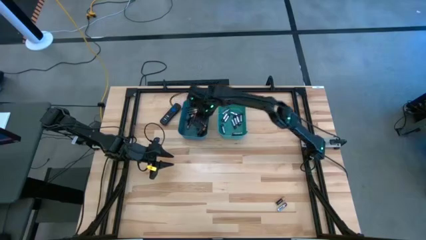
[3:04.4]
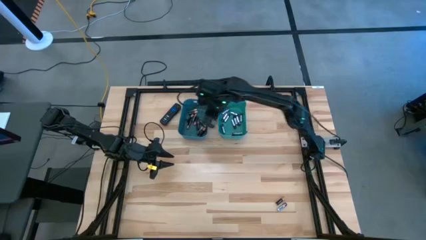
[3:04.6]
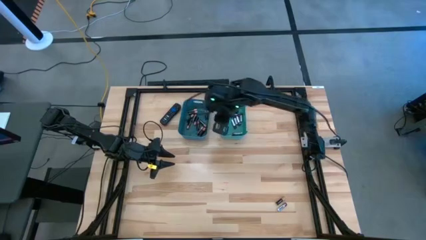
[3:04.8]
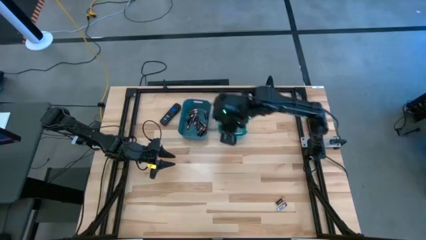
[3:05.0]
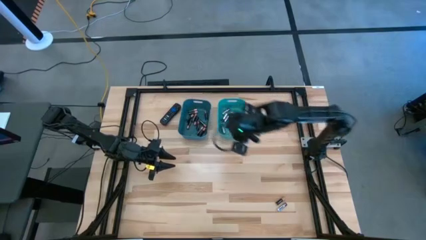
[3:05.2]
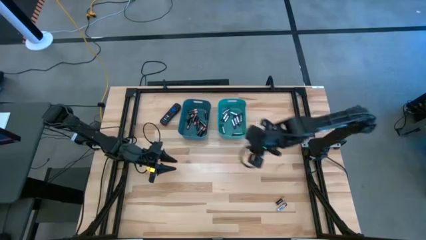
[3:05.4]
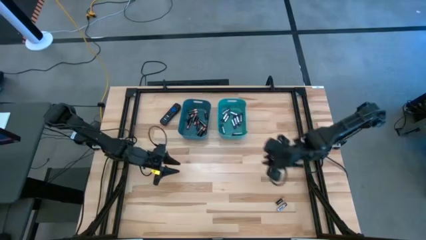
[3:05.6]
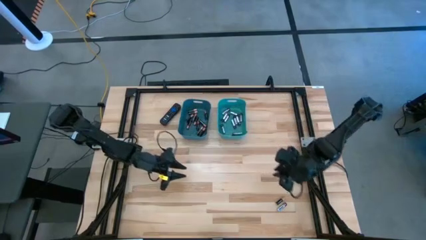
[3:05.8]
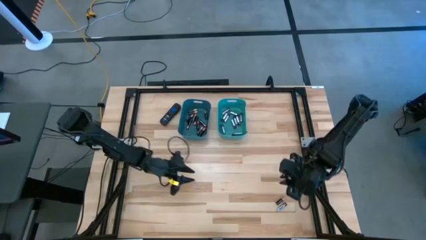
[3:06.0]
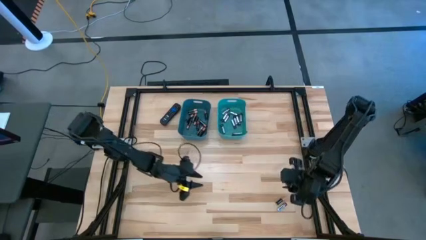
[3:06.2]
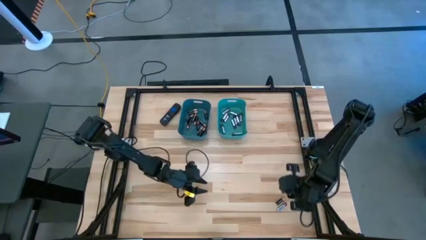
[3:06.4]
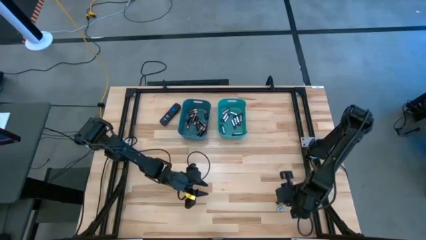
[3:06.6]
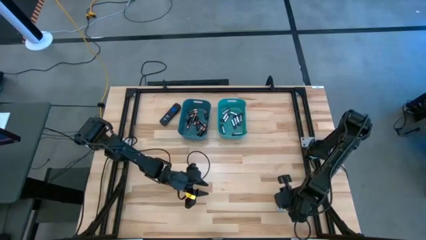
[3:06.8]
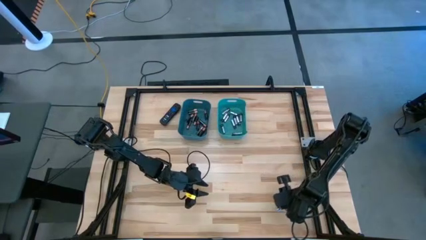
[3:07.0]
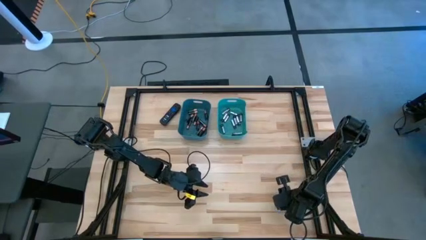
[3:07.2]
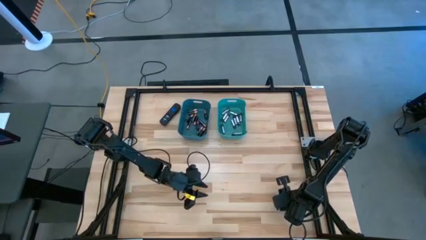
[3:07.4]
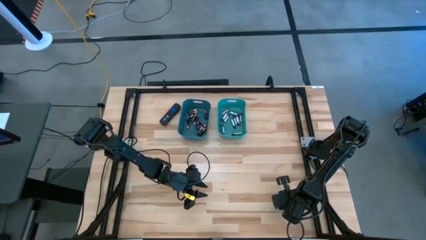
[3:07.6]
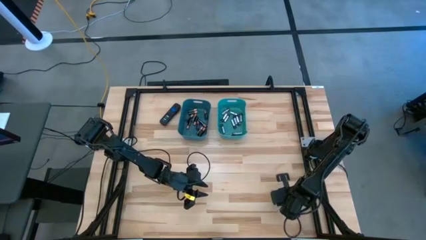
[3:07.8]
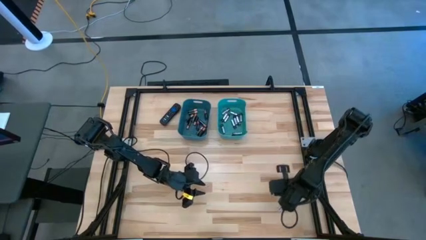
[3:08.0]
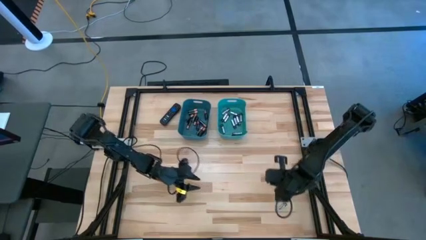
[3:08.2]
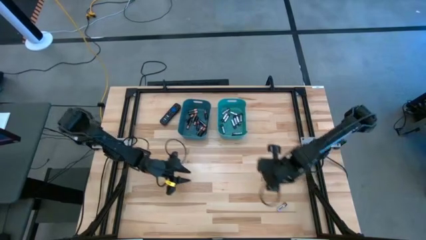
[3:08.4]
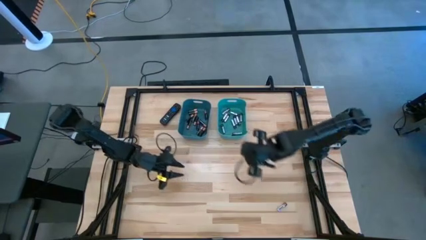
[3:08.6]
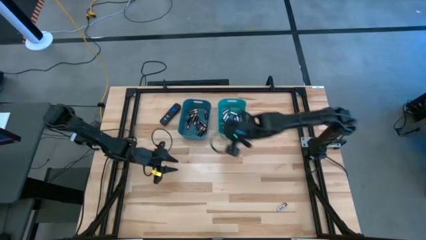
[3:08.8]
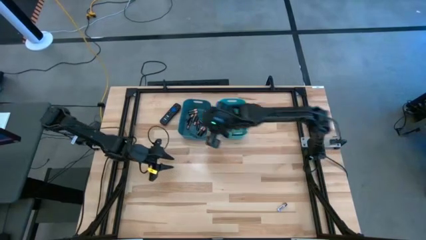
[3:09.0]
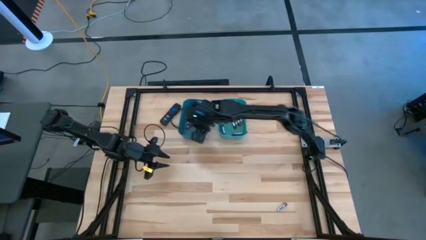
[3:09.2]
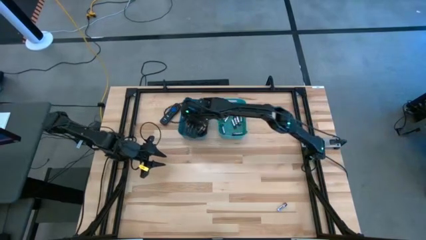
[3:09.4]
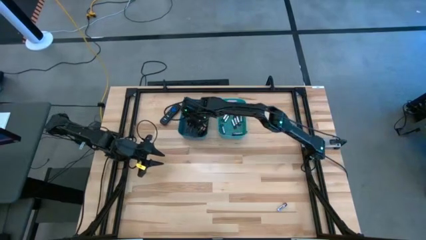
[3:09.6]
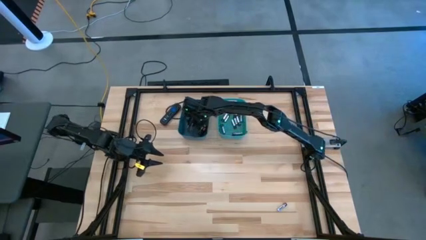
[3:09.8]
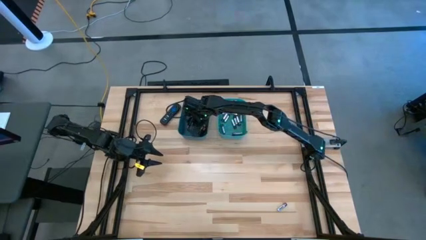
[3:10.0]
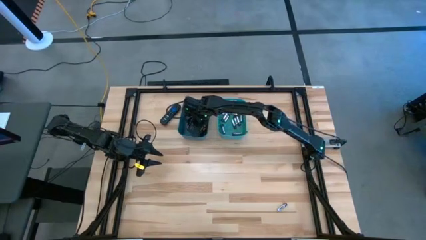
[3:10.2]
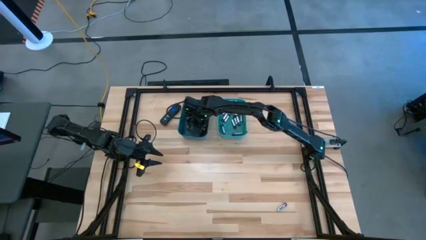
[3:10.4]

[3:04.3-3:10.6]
Task: Sort batteries
Put the black battery into the blue bin

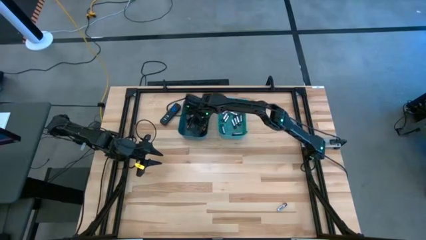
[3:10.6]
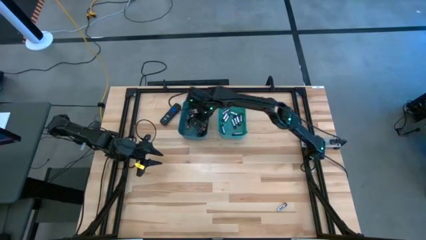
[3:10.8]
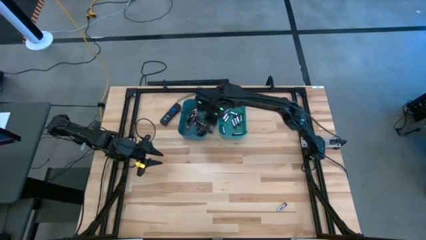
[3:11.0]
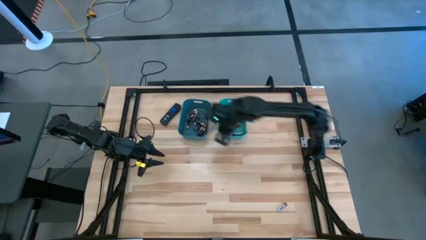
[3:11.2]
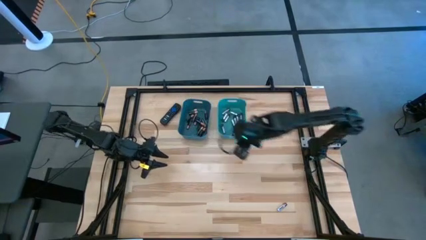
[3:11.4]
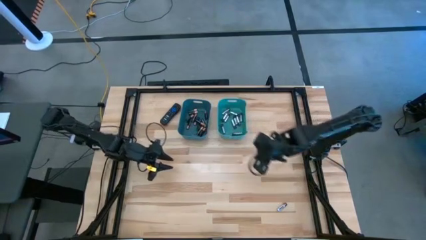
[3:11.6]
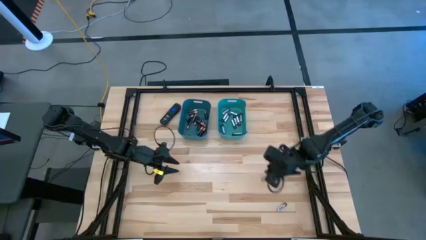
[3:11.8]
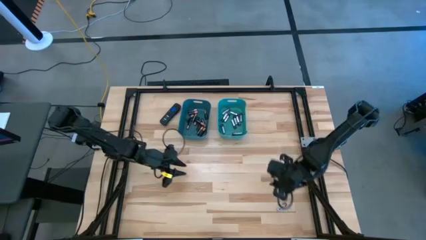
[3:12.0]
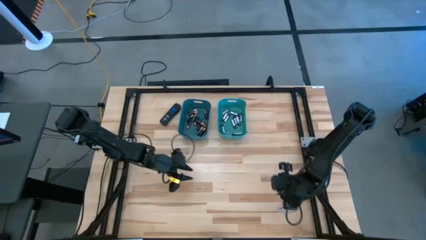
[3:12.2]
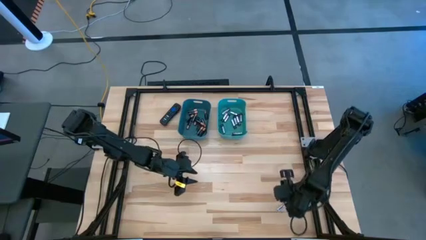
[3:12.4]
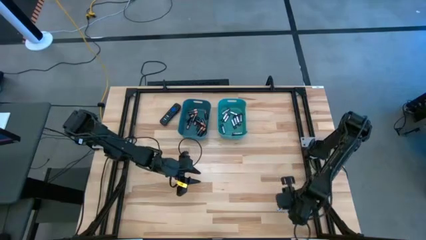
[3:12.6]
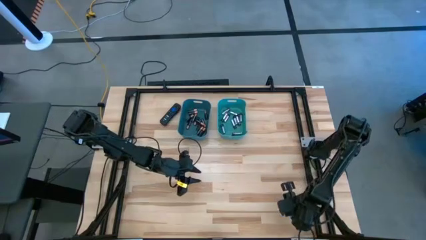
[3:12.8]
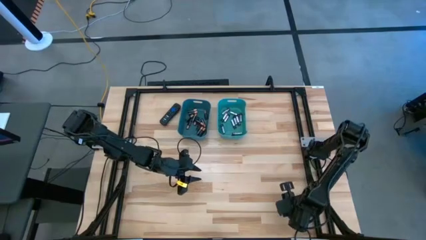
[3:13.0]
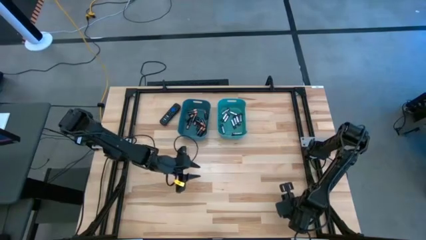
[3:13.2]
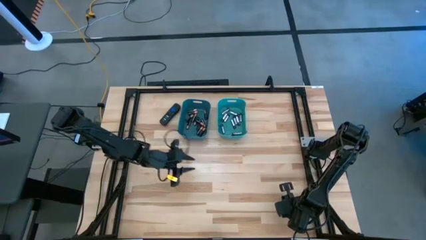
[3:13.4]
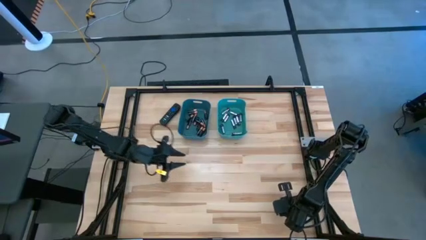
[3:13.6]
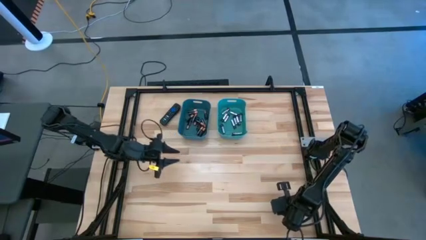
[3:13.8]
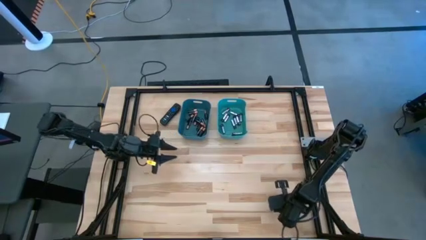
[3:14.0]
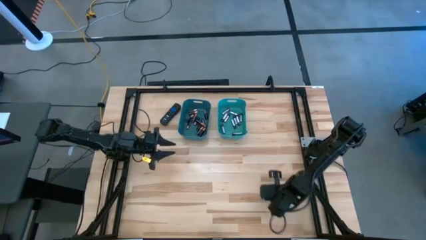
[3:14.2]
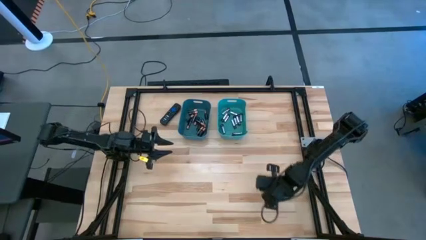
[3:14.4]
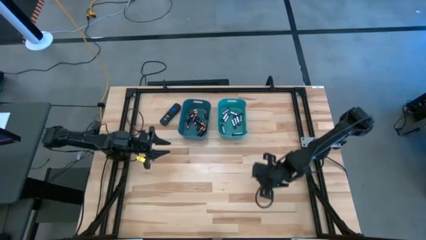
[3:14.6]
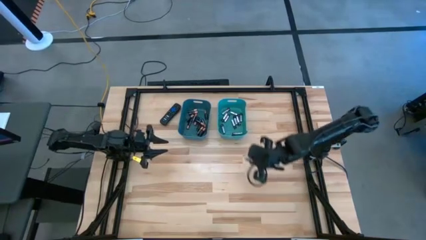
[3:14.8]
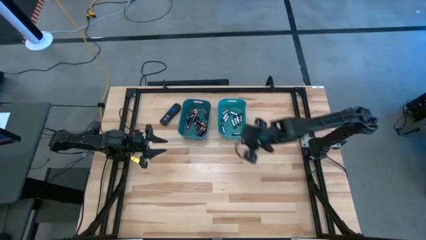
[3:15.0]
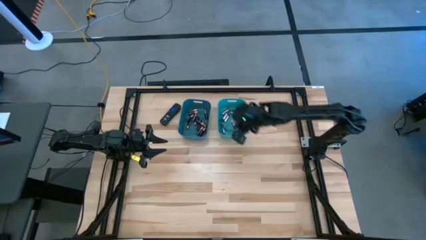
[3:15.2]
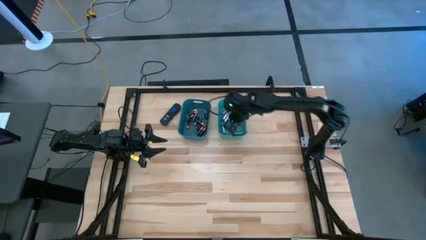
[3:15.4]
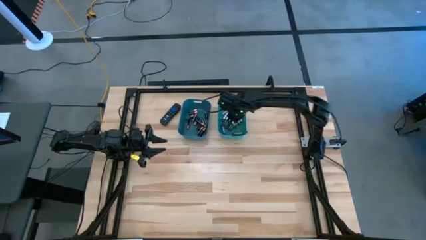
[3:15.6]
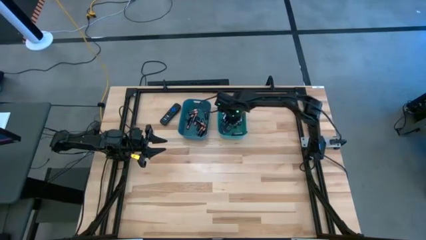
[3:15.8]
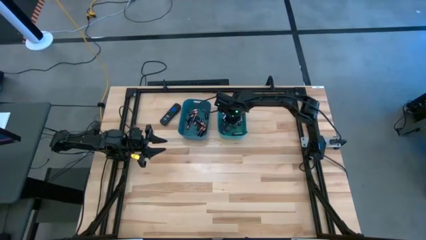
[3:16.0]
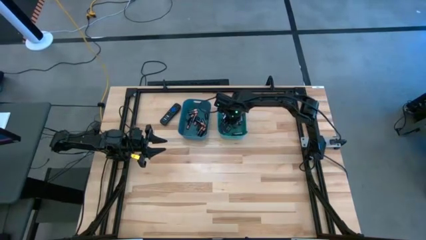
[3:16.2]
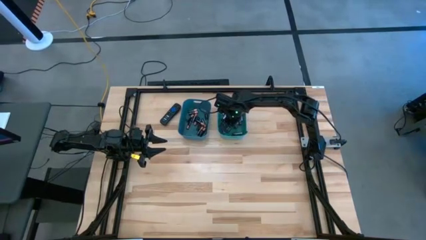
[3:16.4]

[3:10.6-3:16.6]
Put the silver battery into the green bin

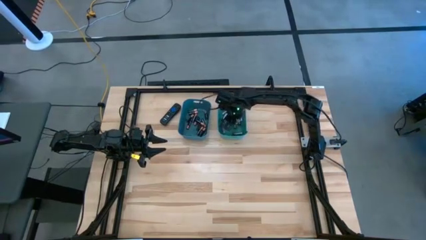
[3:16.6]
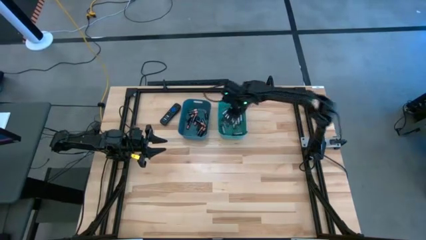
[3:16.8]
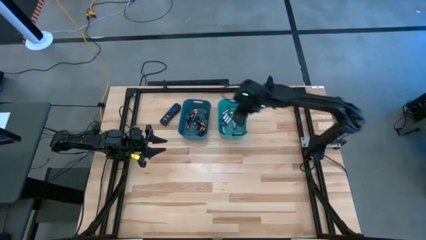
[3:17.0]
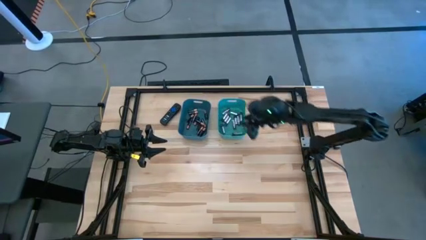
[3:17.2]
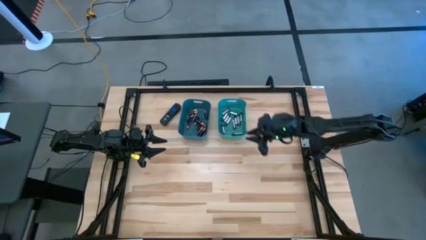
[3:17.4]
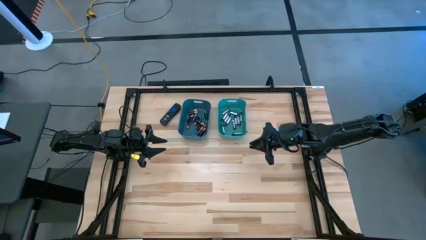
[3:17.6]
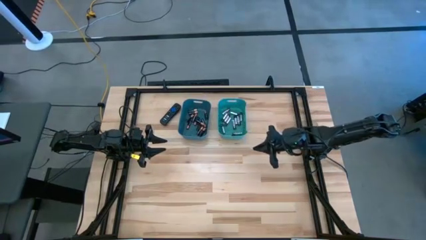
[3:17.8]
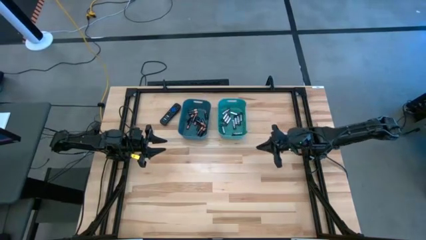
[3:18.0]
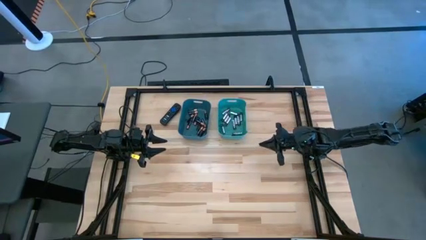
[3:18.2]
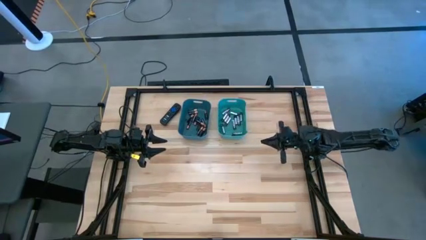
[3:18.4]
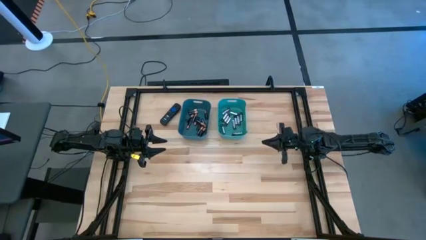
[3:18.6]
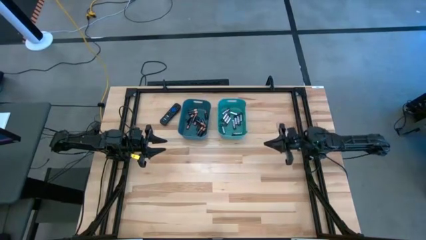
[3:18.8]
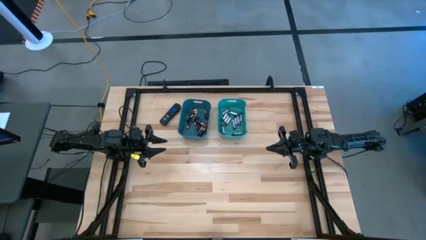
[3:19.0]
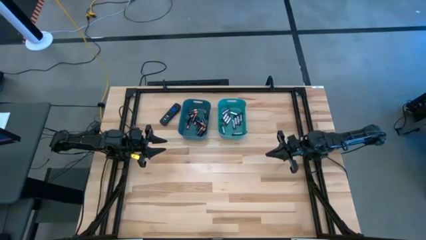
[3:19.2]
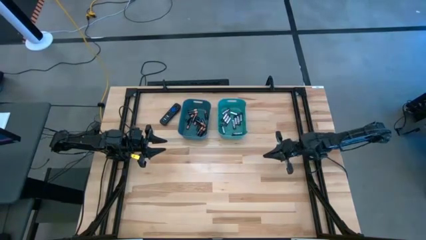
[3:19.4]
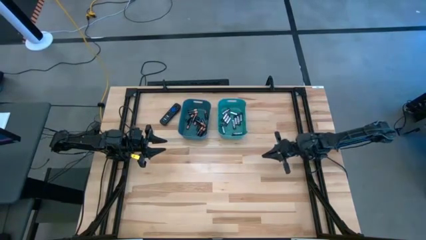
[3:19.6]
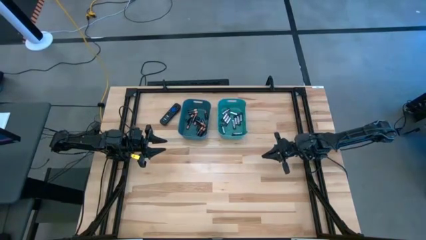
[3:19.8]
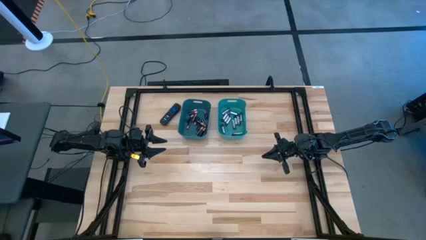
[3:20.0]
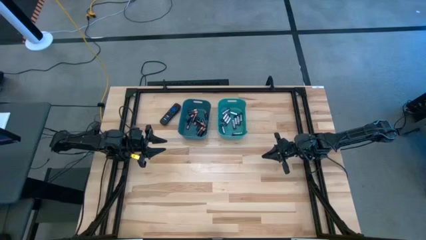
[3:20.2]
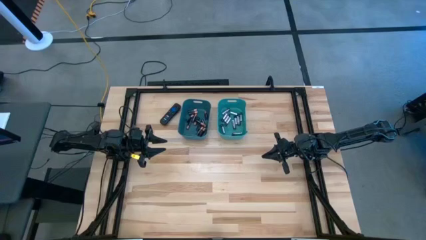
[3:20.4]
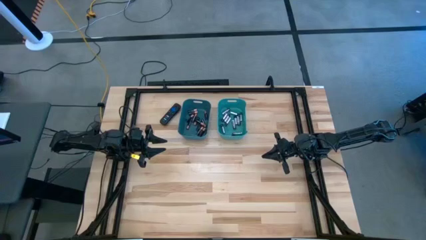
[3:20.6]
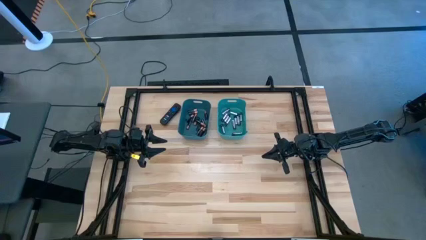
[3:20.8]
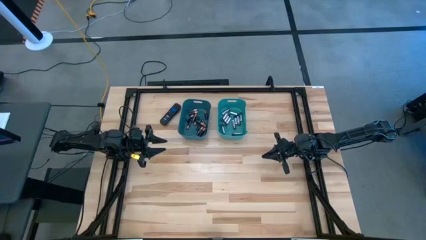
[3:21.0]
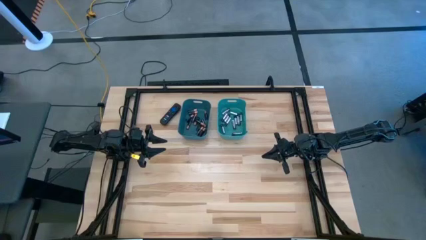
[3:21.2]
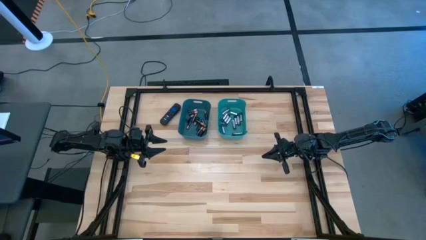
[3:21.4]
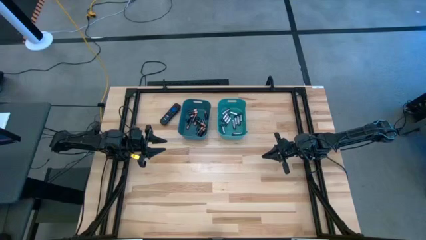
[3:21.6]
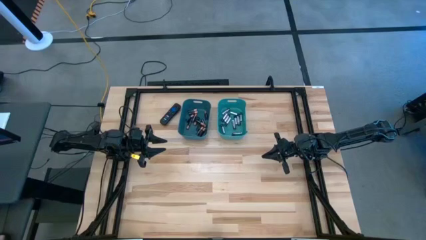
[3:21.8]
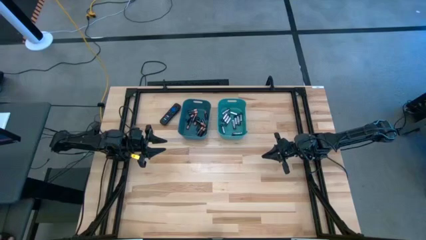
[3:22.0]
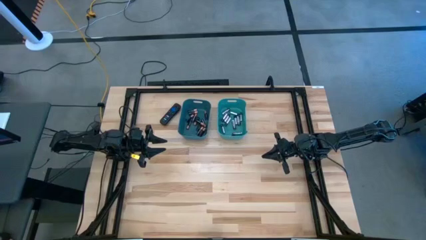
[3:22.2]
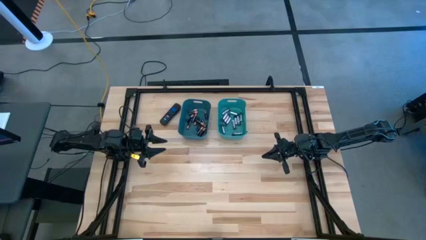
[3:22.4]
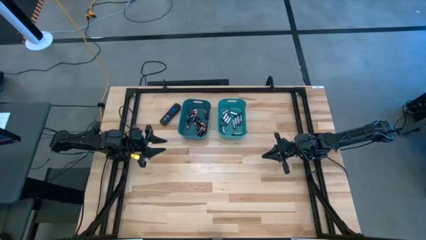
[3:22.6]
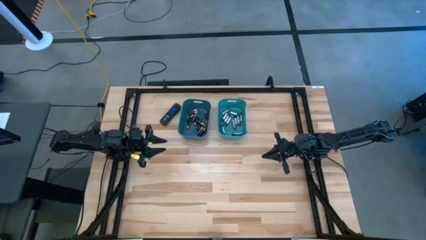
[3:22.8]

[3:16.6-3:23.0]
Return to Home Position
